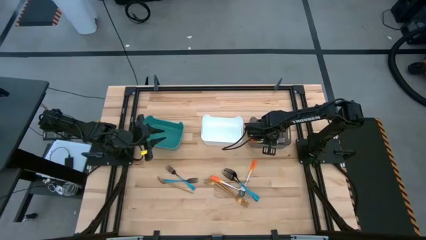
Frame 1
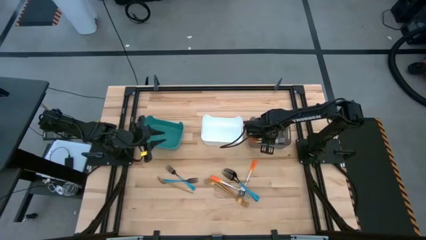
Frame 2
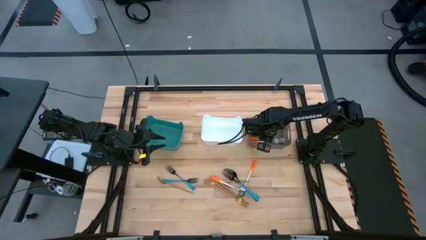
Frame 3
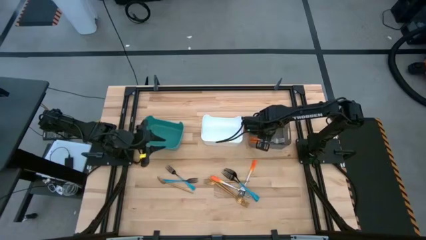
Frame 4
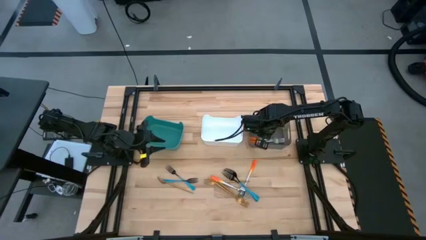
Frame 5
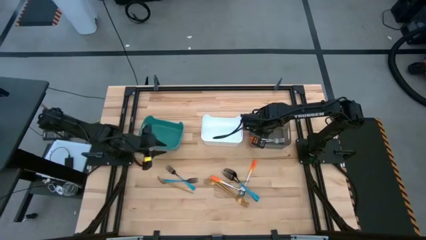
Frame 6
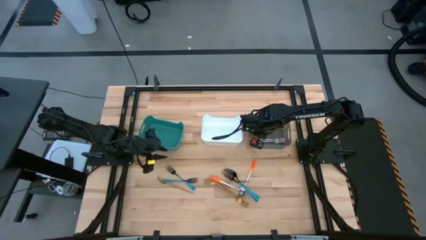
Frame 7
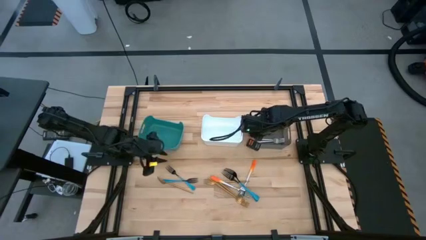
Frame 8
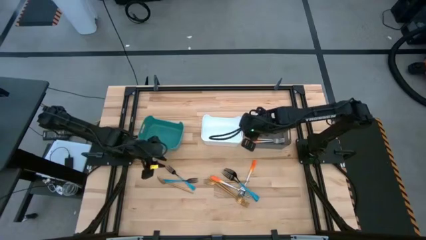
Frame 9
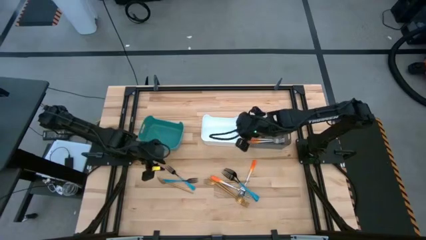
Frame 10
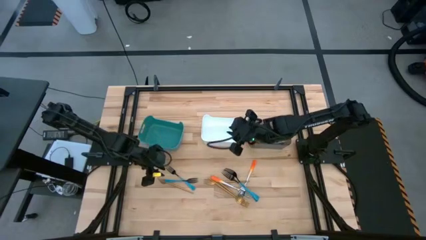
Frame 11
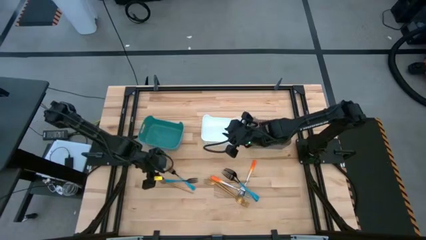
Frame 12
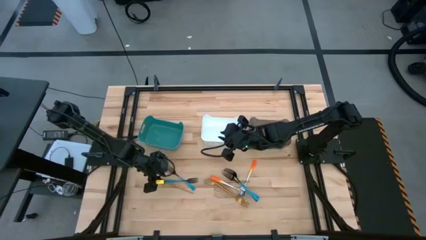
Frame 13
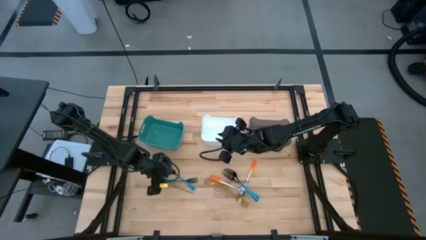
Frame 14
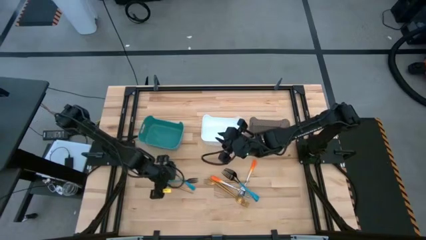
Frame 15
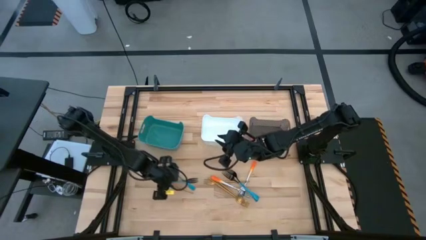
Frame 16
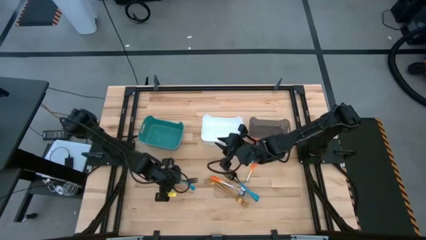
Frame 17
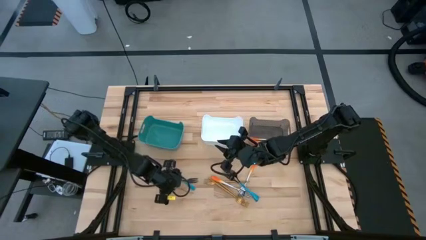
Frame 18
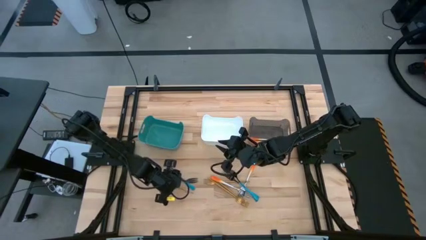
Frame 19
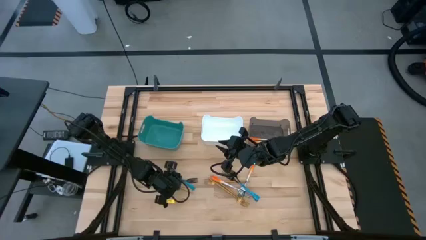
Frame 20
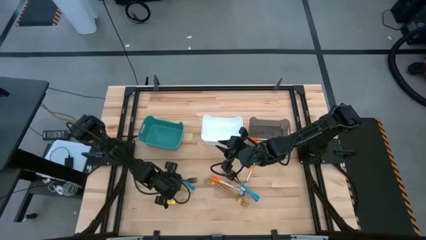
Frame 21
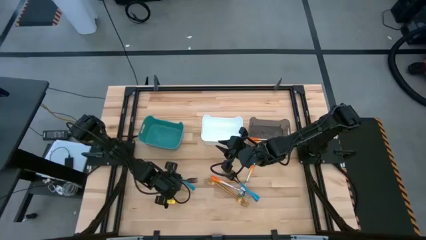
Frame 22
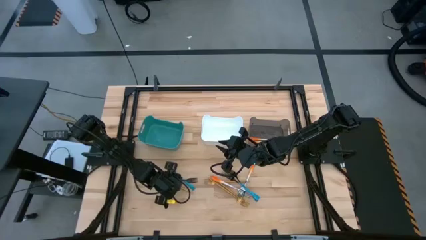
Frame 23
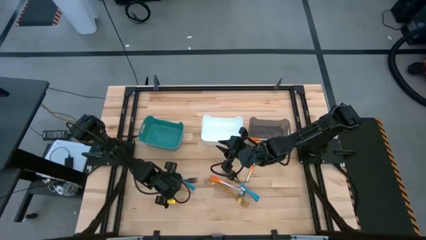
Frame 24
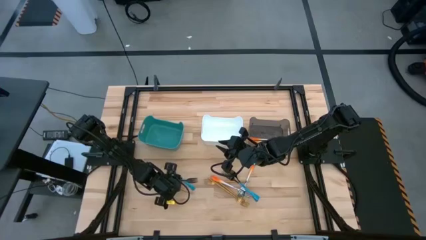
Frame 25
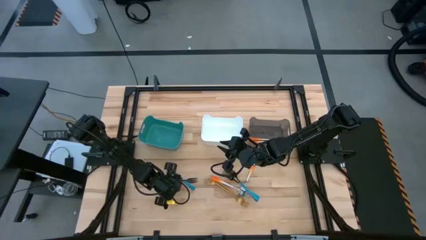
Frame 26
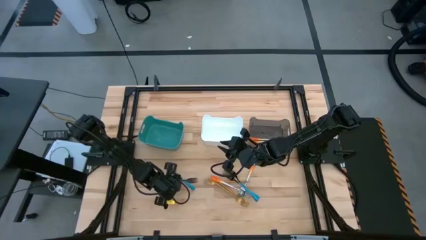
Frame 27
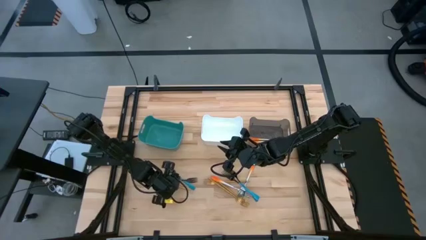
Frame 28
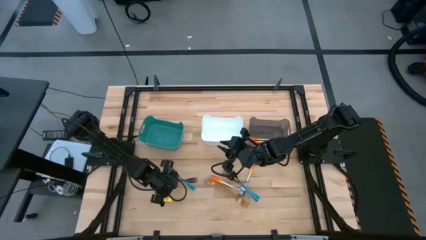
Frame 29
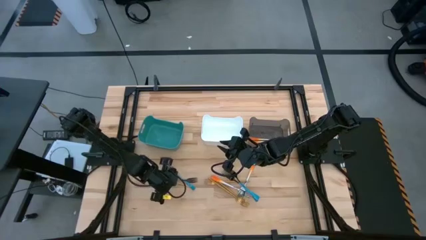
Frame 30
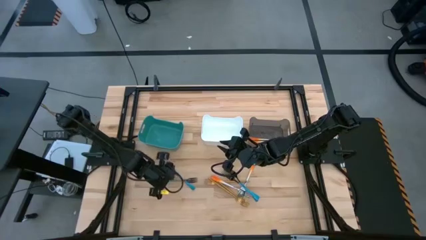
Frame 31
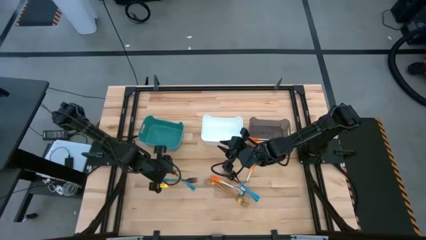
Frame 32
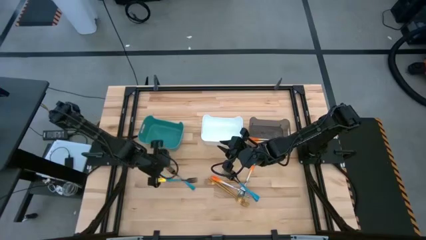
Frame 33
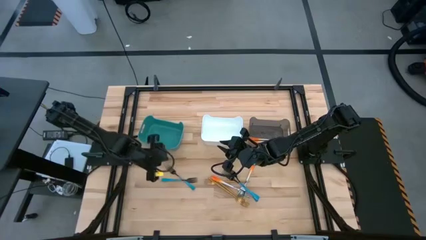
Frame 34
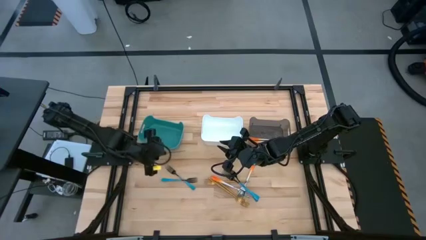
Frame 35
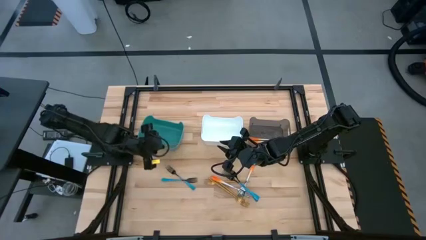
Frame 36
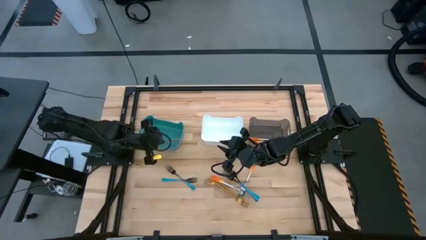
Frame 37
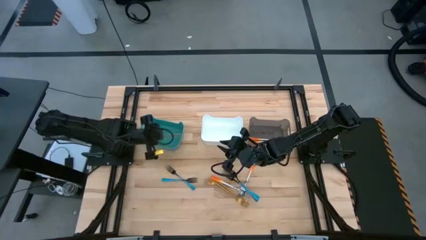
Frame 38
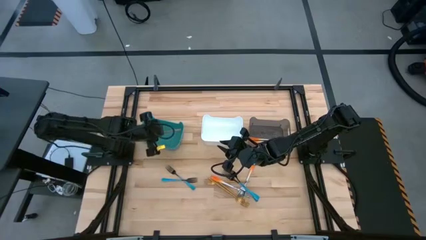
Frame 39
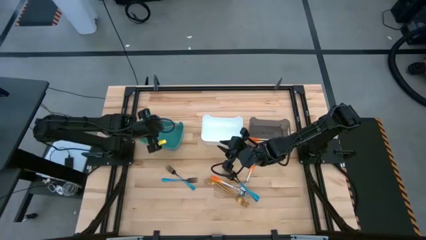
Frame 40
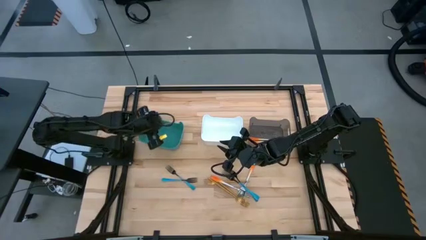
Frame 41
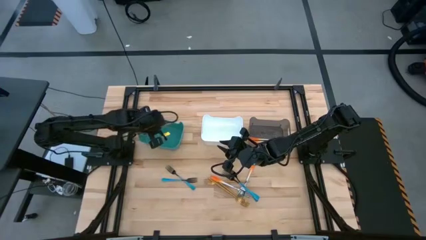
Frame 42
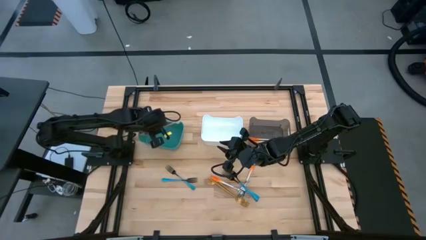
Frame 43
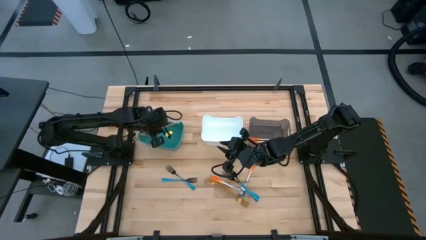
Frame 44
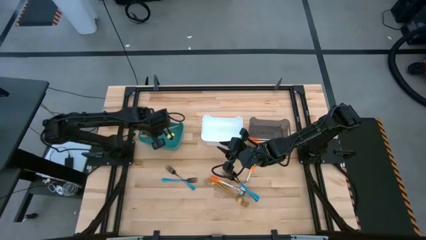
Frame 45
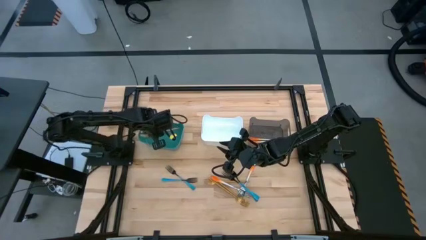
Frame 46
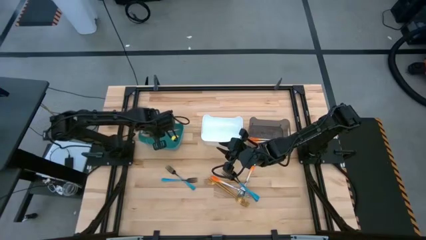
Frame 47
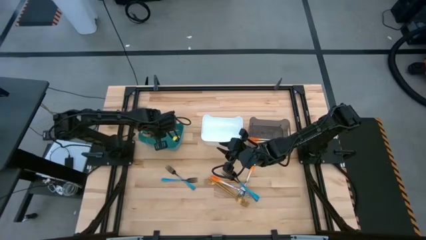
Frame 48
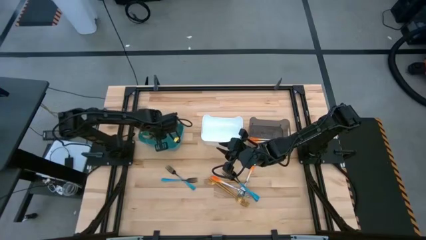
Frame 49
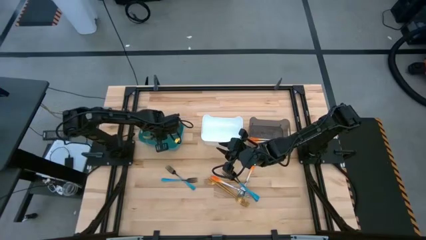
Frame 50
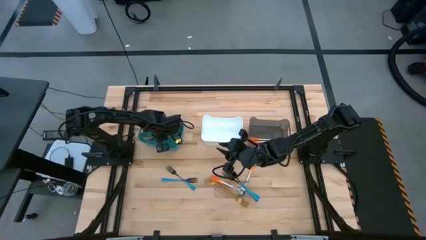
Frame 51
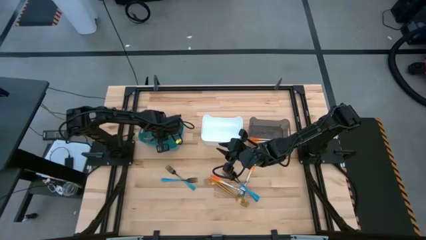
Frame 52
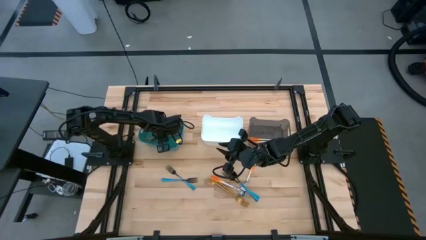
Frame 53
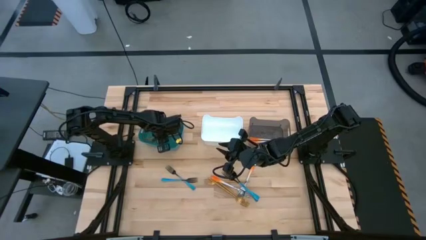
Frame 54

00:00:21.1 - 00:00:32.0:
Task: Sort silverware by color (type)
Put the left gold fork into the green bin

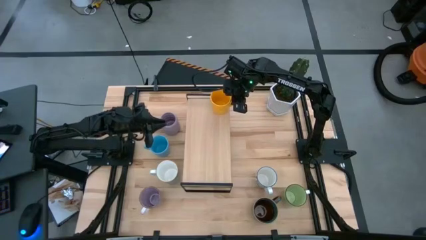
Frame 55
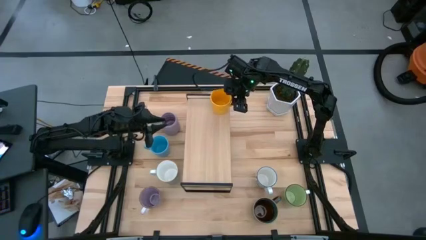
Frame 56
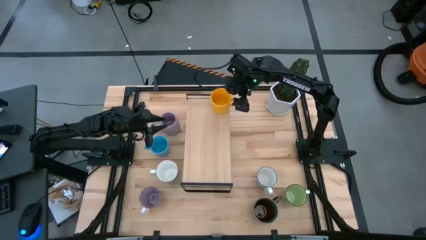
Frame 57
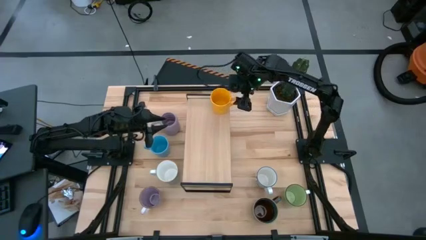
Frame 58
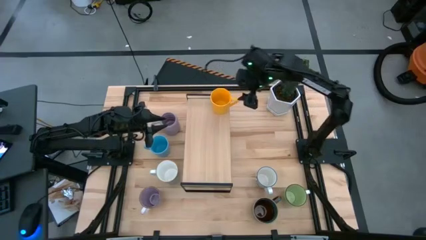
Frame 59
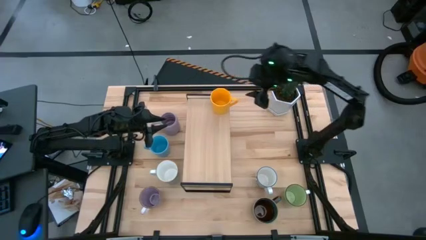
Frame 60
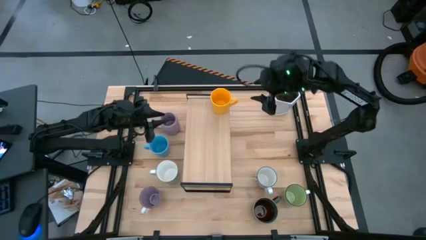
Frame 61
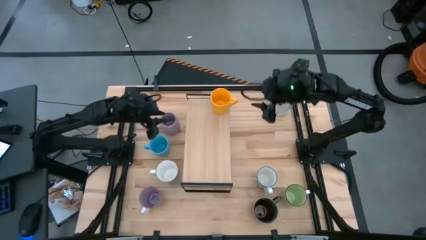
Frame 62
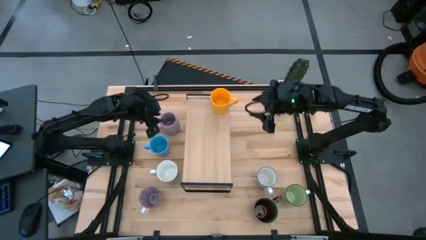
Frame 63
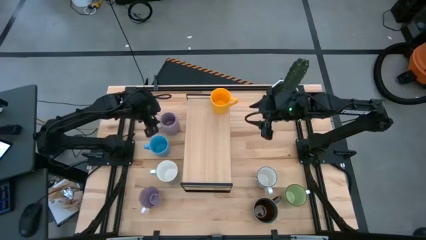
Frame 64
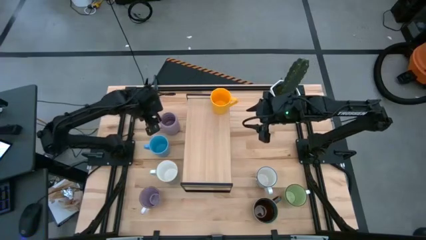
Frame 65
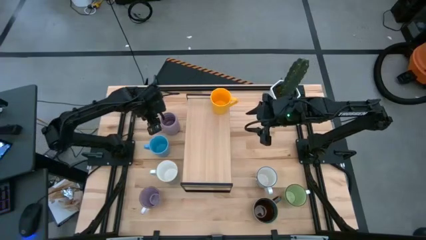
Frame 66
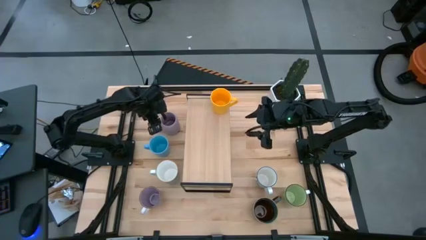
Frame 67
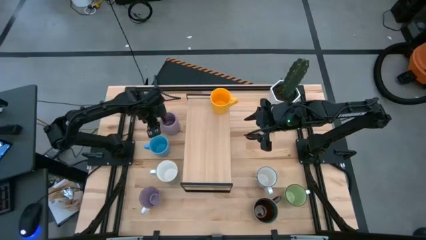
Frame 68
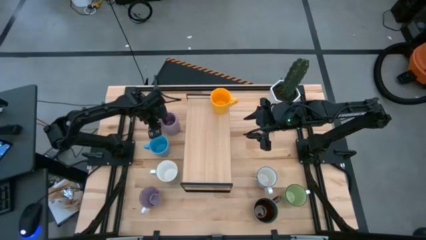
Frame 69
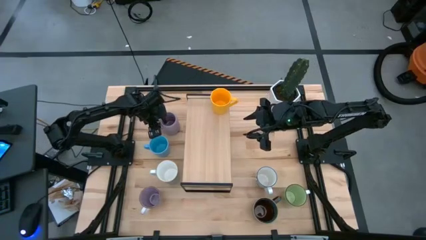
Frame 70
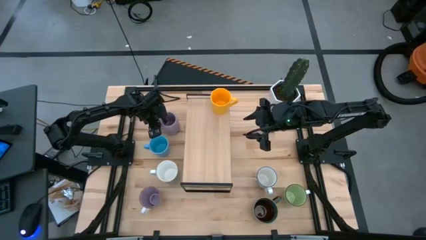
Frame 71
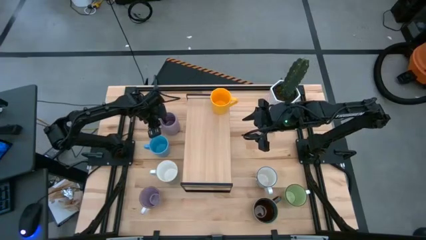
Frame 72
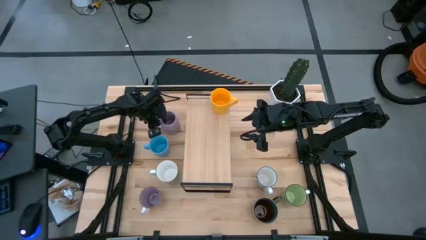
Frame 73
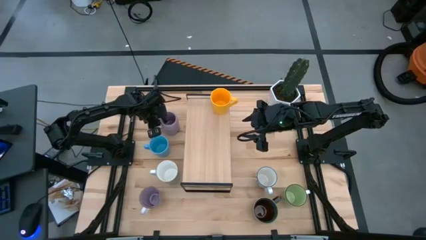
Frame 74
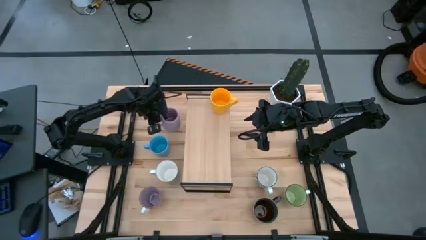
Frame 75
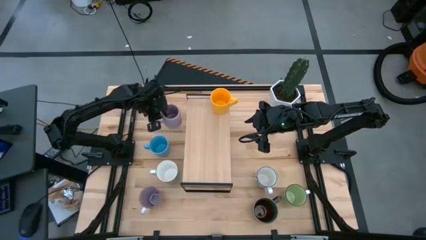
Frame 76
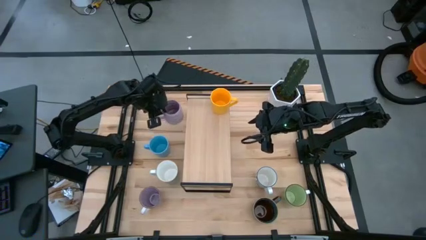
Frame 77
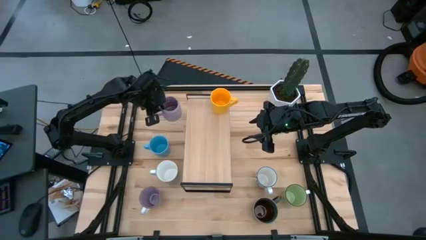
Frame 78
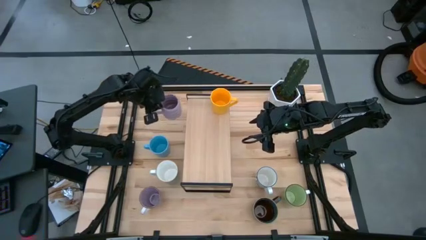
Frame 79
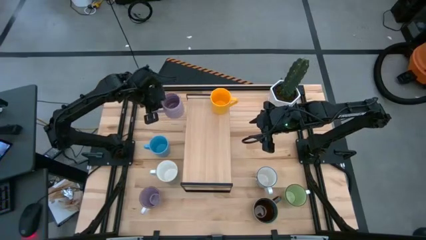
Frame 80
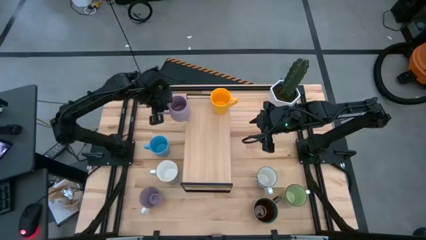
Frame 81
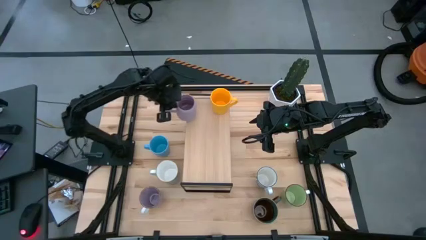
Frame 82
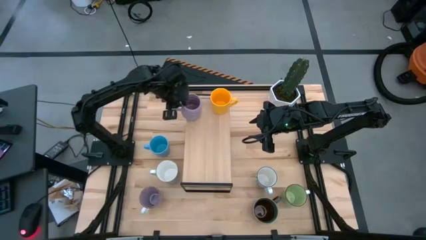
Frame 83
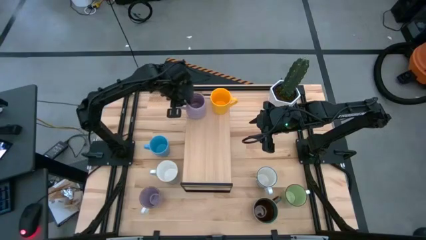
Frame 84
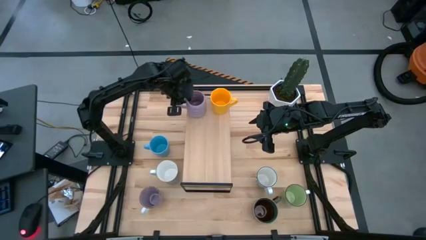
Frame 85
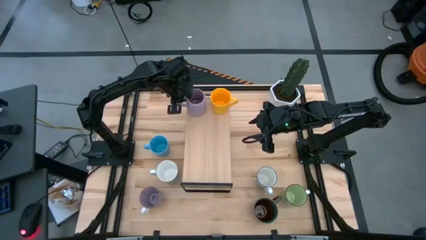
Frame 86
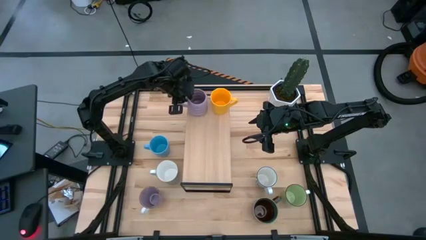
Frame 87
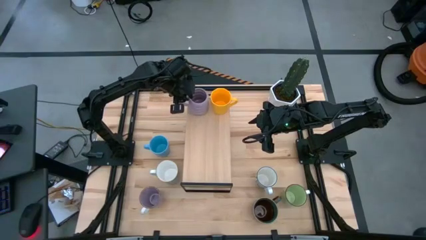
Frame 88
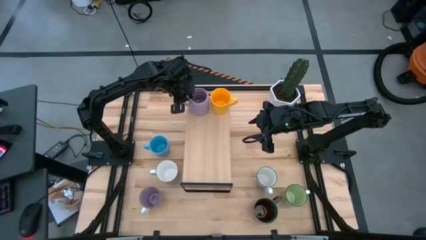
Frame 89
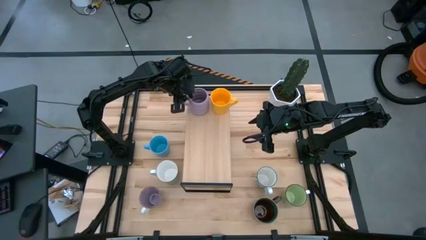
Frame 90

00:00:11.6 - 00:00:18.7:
Task: Place coffee mugs
Put the purple mug on the shelf
